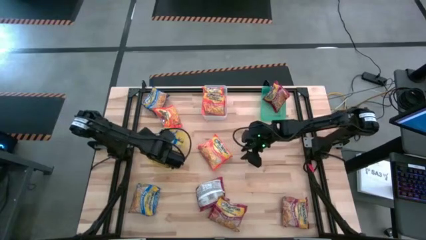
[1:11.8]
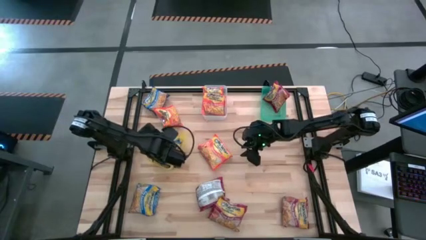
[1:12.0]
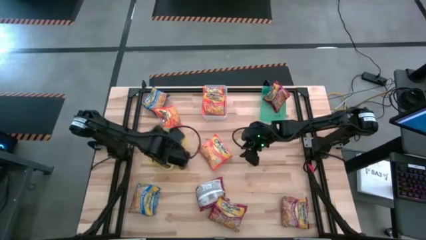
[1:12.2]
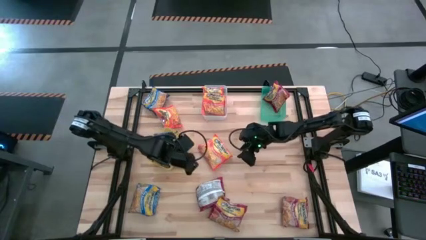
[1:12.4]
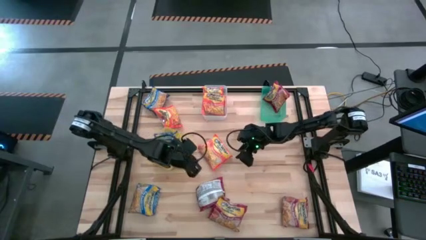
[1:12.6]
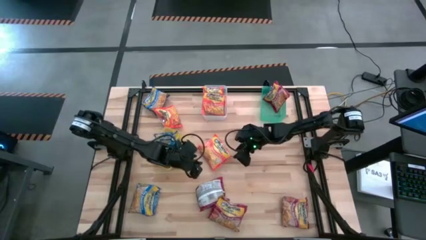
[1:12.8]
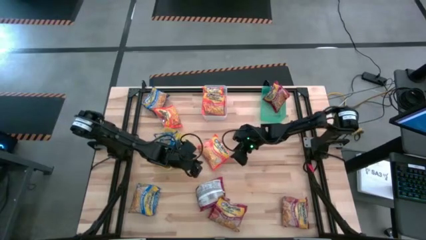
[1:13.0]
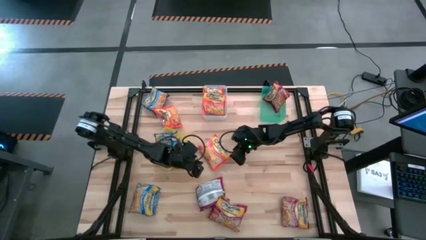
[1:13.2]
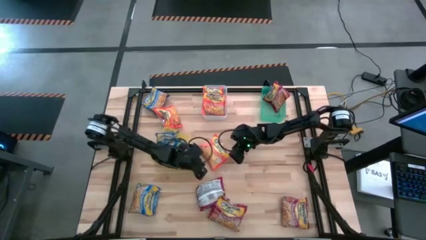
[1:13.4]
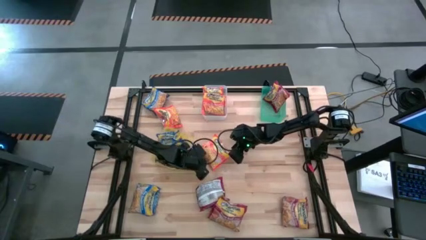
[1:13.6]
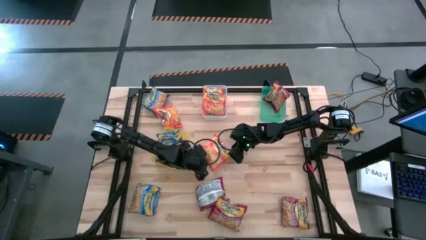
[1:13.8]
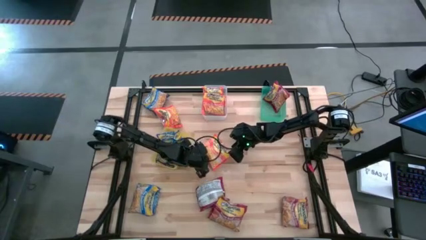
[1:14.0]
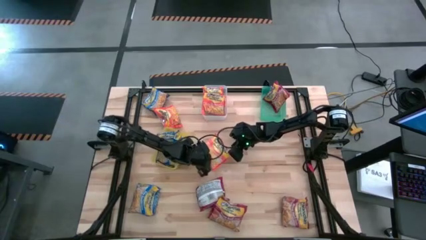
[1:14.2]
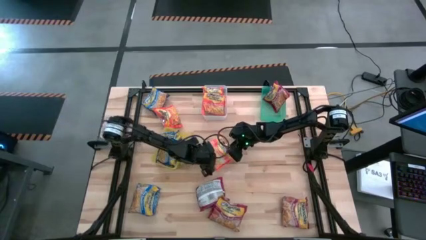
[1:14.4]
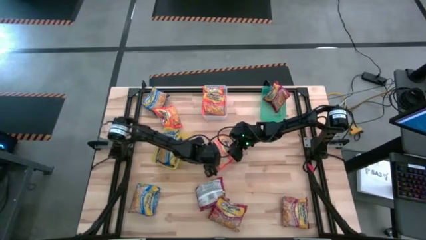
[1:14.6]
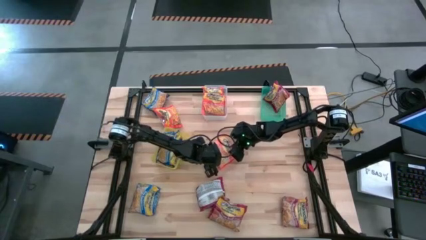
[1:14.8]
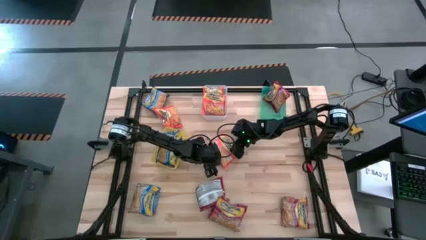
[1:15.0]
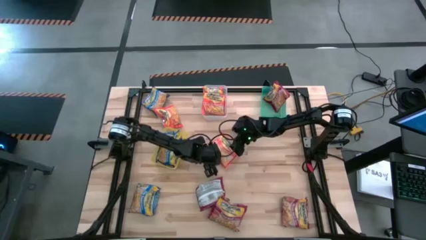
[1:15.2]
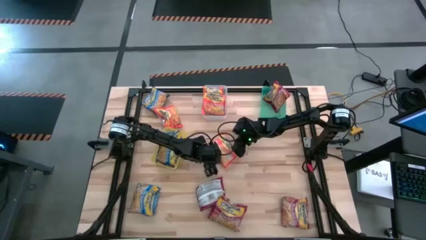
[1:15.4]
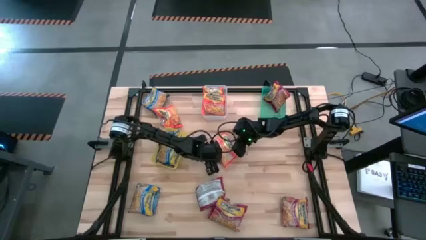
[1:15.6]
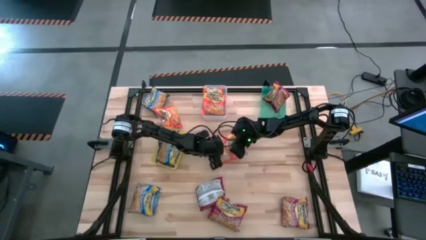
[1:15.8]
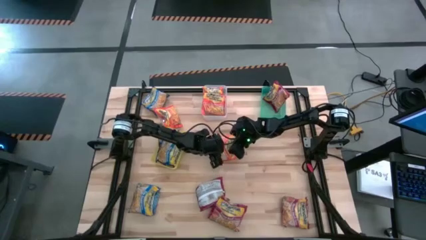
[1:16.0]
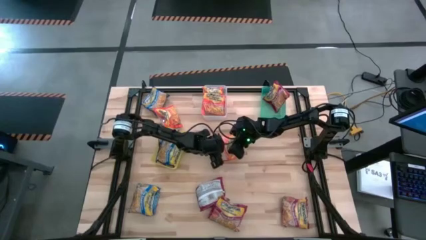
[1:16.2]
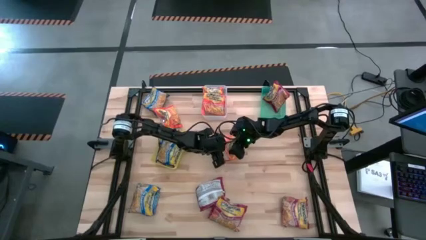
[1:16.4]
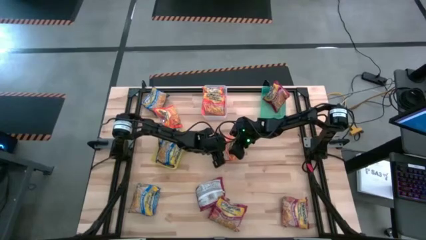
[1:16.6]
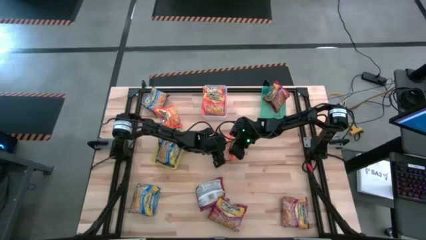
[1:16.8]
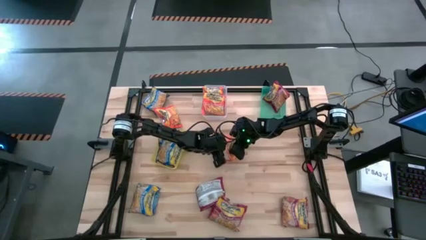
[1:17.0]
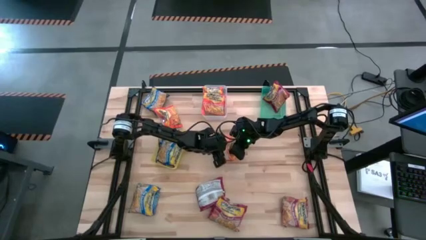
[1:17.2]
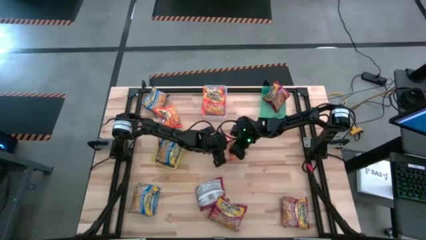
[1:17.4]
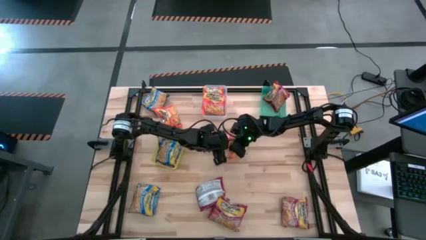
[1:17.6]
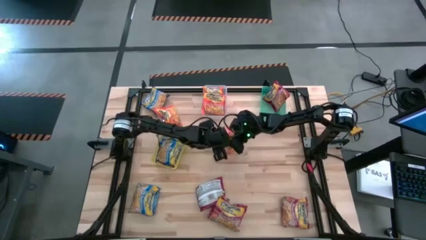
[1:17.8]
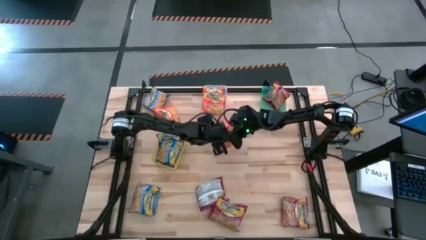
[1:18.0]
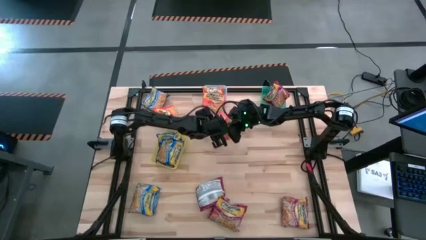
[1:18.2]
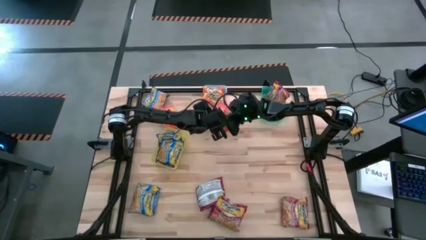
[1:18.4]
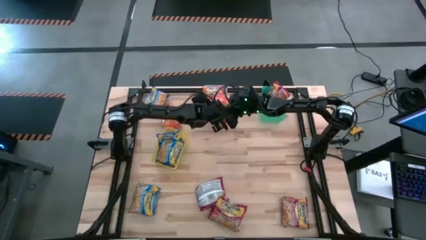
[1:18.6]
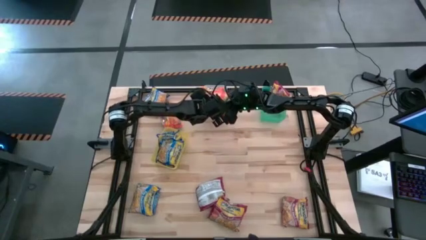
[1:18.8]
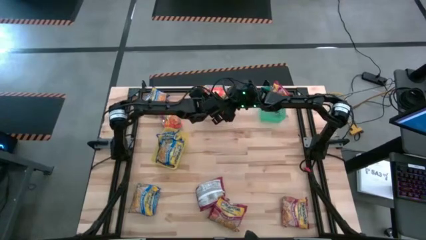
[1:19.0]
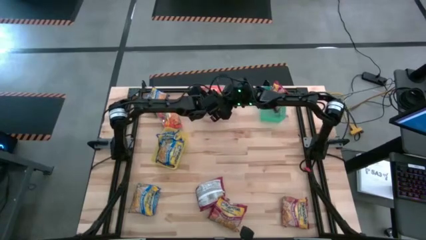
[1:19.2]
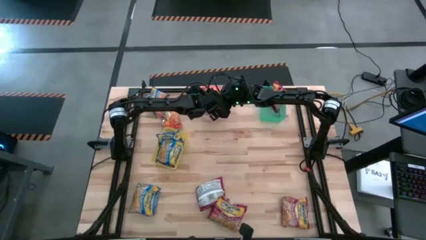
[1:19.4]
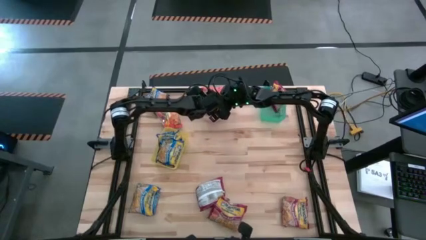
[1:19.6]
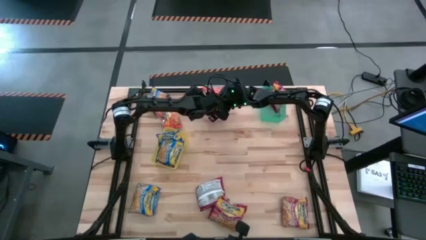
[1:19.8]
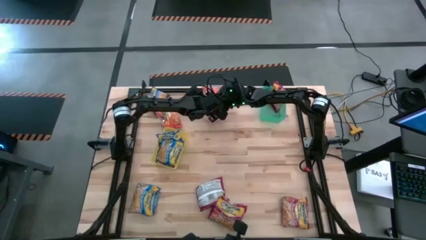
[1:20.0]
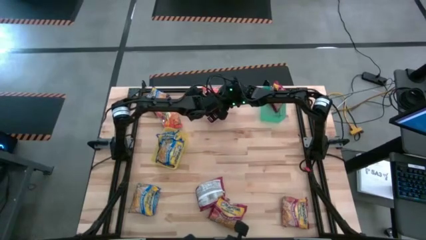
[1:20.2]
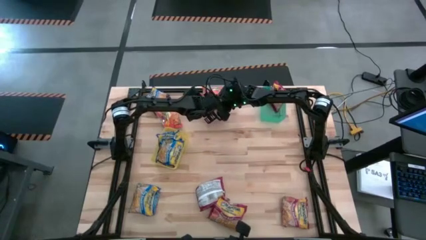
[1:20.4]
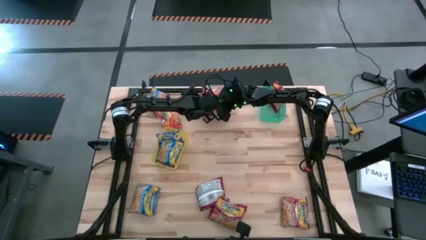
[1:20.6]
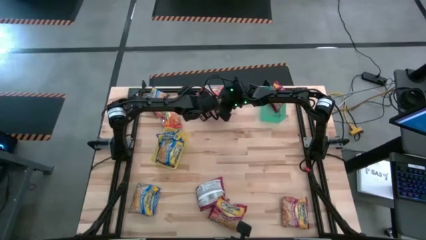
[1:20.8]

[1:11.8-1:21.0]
Task: Sort Maruchan noodles
Put the orange noodle pack into the transparent bin

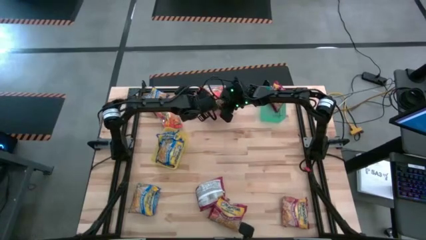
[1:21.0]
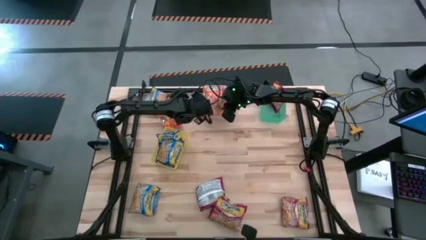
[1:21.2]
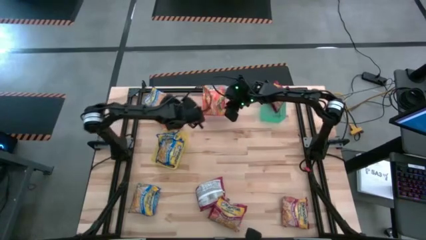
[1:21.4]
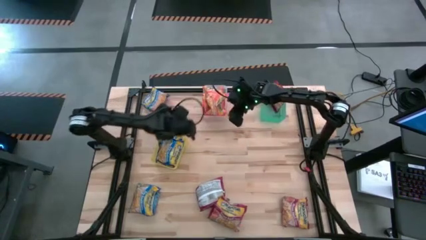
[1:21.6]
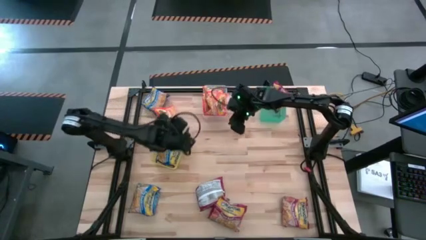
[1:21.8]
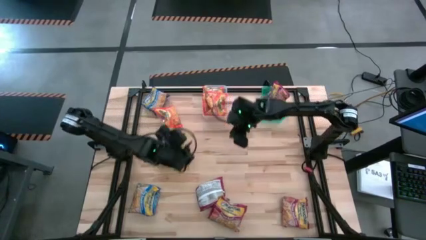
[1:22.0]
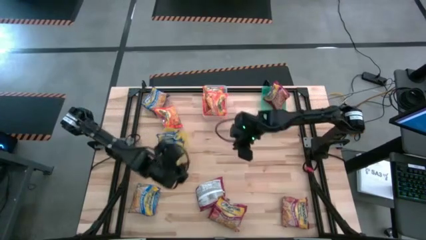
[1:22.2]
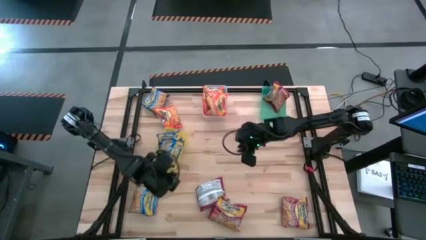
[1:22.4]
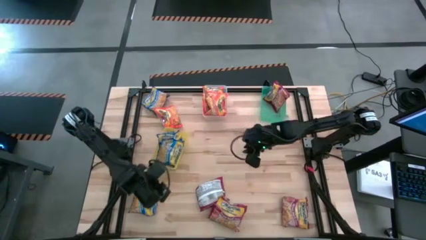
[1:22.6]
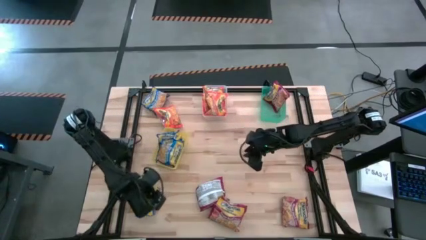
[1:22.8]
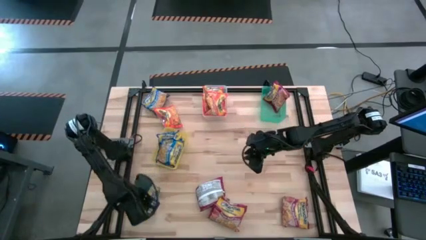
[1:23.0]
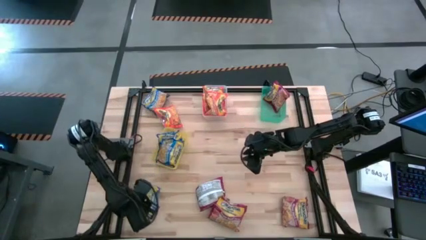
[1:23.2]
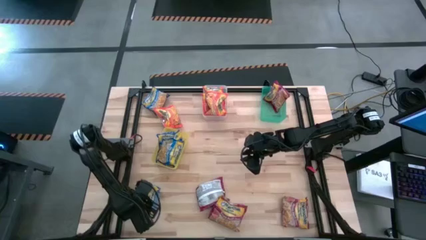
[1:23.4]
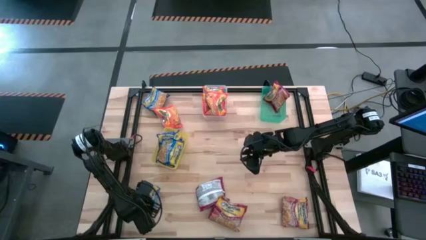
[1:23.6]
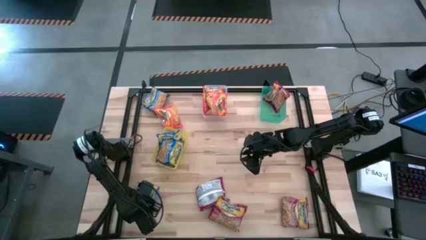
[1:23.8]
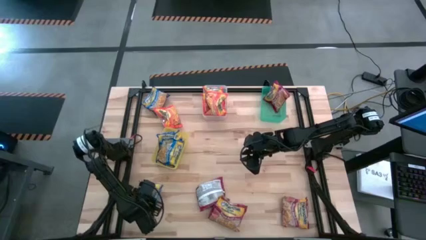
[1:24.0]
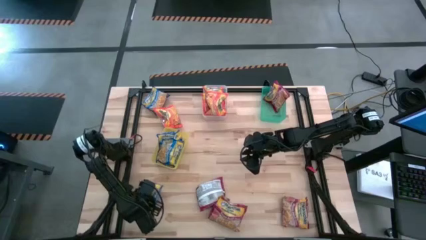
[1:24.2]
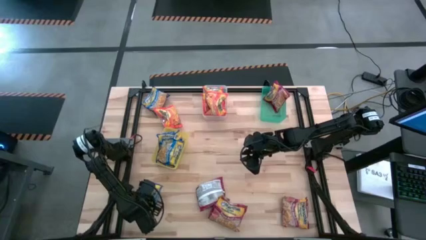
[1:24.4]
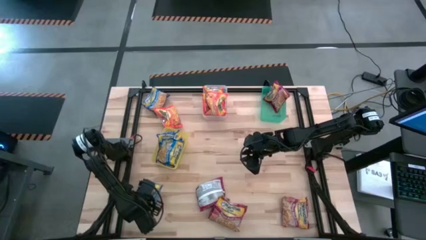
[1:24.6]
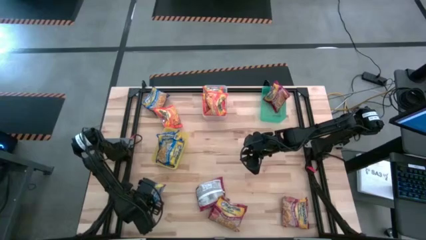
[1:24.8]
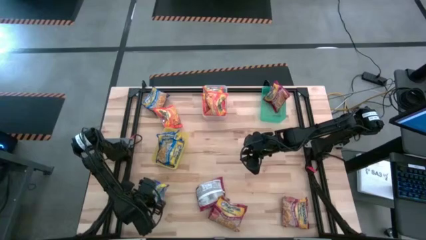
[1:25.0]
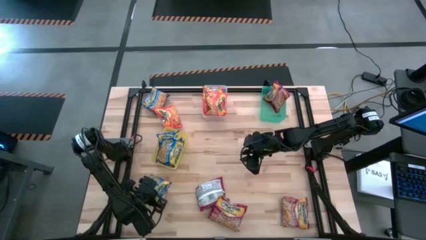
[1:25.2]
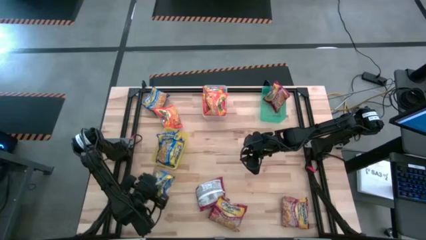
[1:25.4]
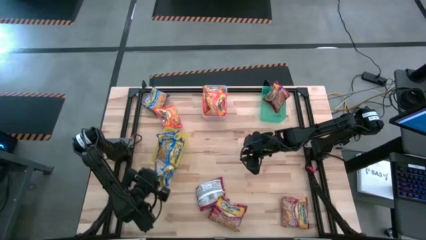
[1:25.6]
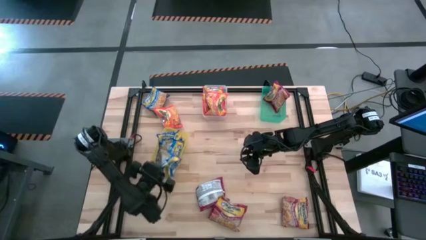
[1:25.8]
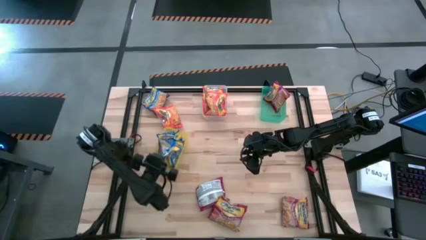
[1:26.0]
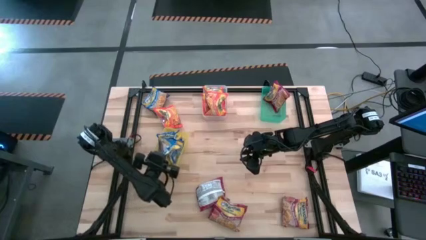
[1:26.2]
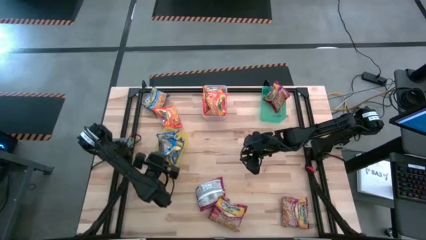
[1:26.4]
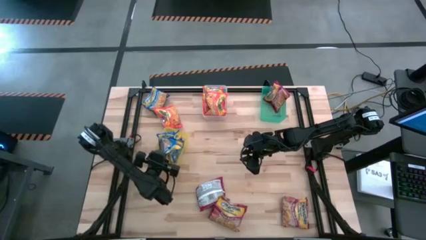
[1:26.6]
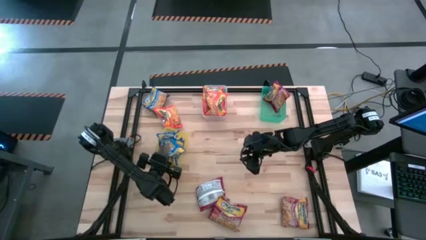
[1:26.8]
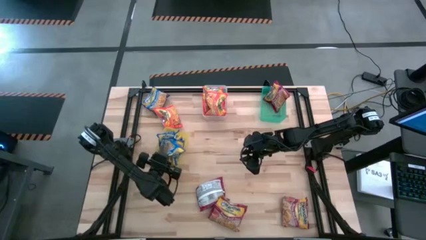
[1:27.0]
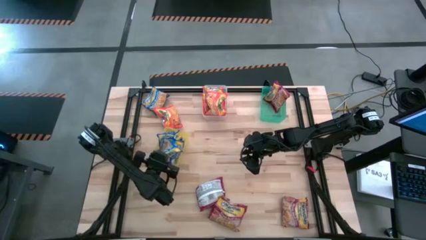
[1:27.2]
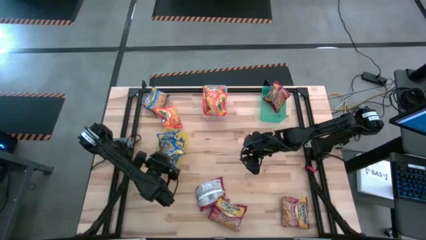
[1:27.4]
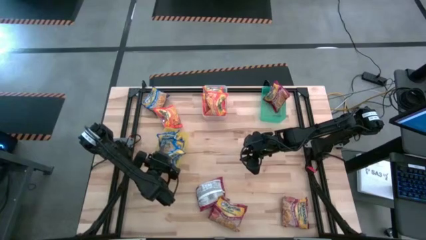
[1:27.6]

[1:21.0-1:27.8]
Put the blue noodle pack into the yellow bin

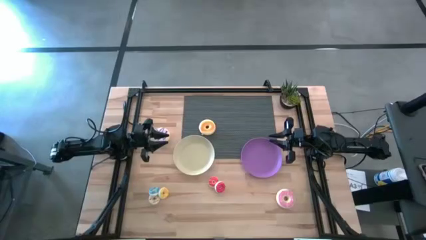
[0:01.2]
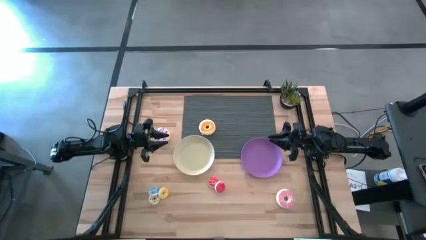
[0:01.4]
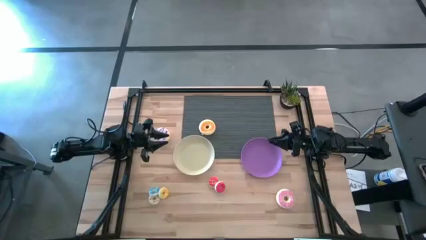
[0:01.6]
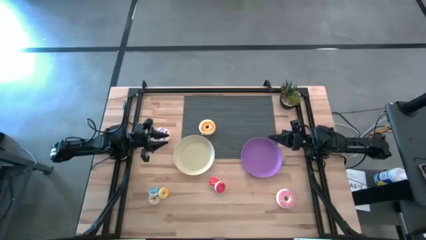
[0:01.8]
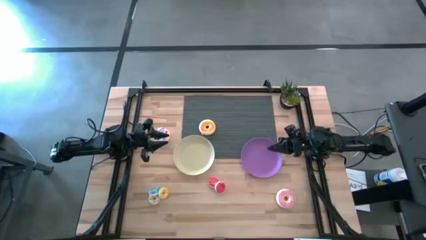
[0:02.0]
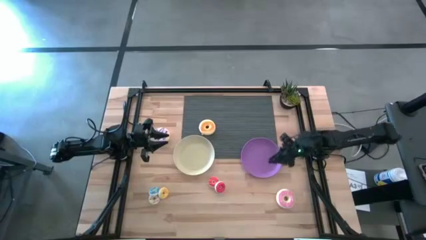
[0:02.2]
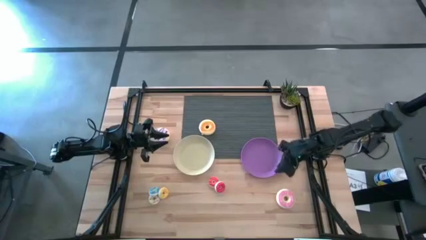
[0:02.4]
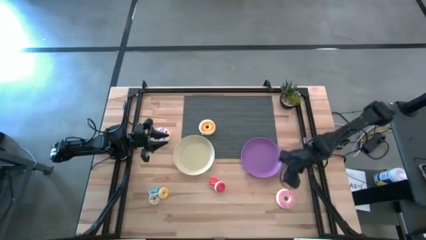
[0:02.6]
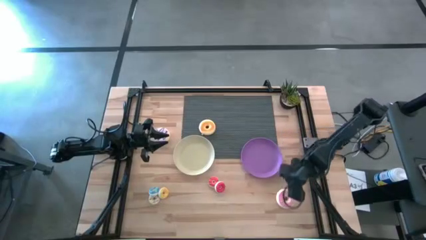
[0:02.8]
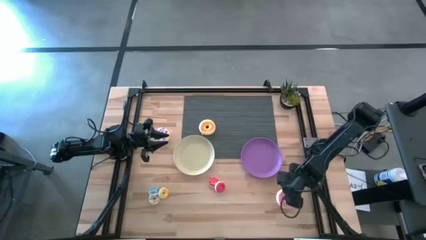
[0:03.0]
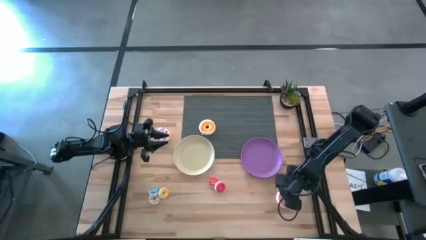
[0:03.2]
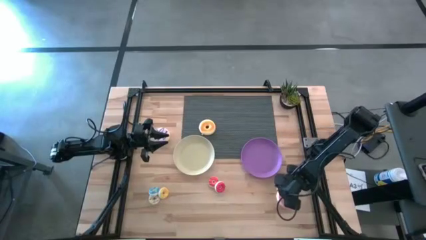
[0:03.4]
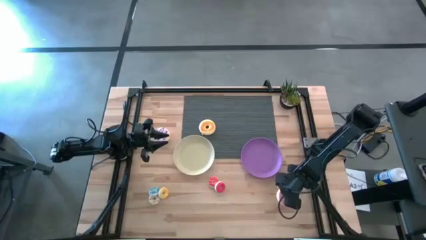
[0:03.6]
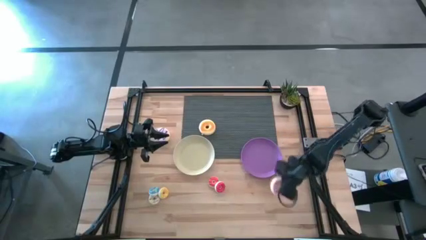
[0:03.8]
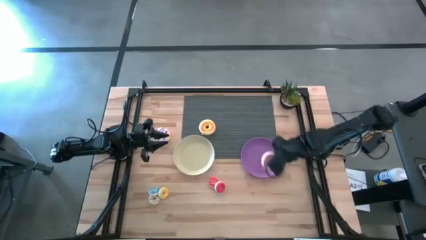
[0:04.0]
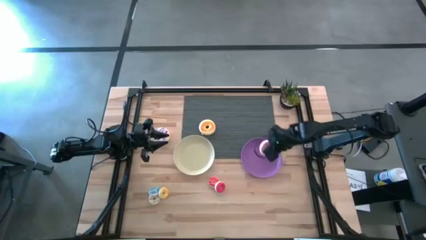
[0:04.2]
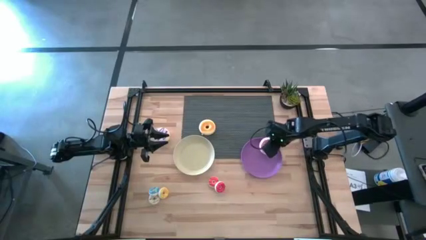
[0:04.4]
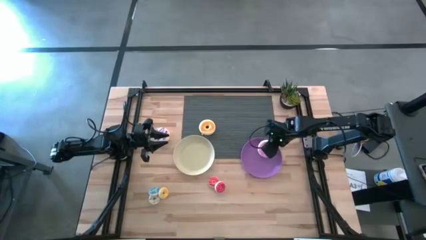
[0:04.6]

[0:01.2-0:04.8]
Task: Pick & Place donuts
Put the big pink donut on the purple plate
